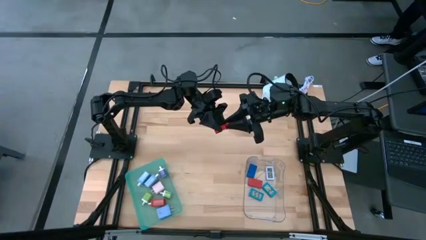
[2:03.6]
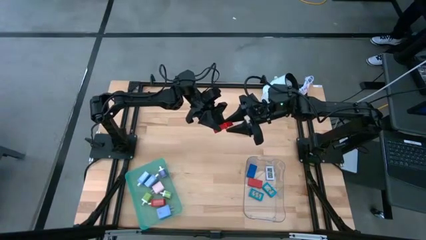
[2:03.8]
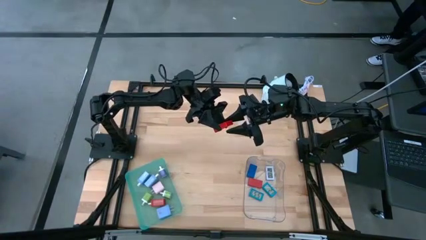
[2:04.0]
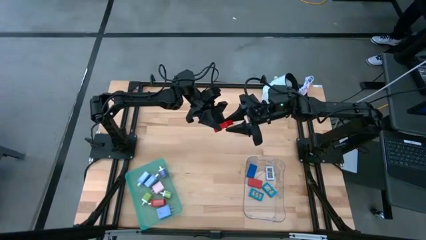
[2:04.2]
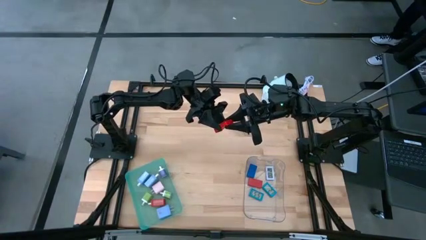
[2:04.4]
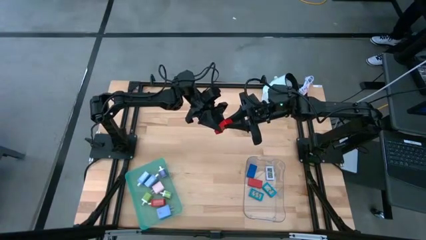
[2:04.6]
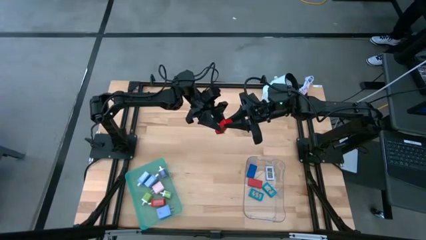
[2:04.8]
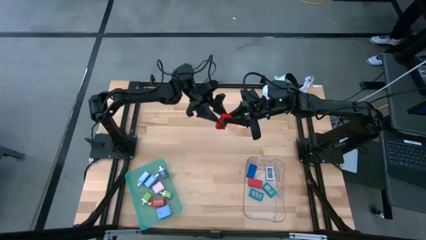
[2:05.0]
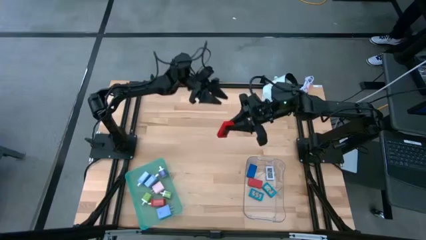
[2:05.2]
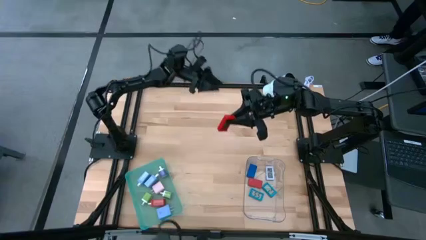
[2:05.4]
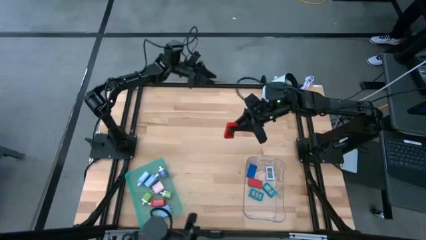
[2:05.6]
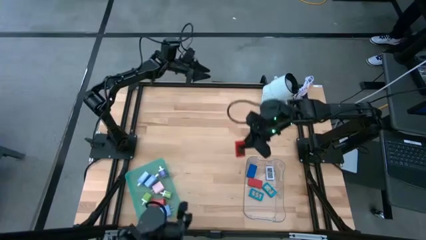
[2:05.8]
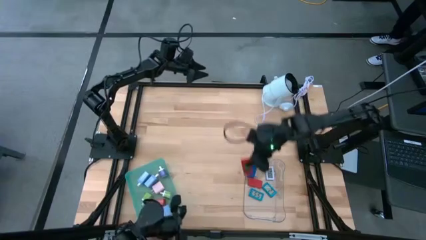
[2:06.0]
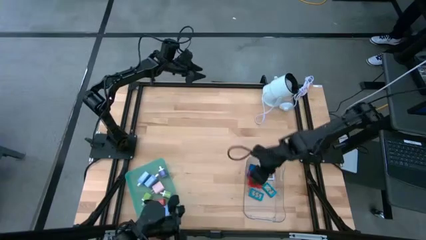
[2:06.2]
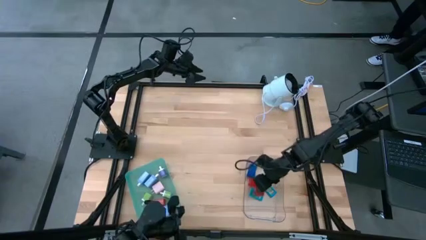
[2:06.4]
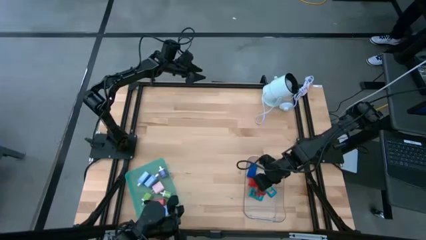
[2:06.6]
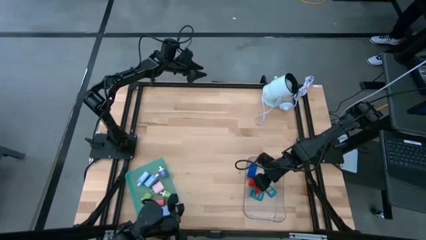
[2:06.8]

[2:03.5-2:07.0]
Task: Pick & Place Office items
Put the red digital clock into the transparent bin

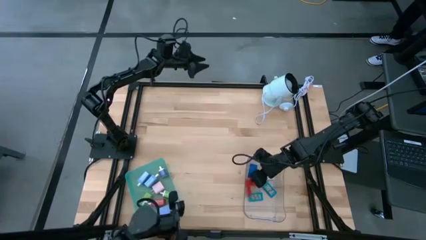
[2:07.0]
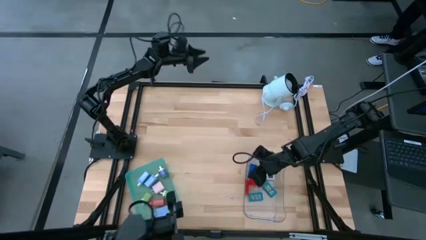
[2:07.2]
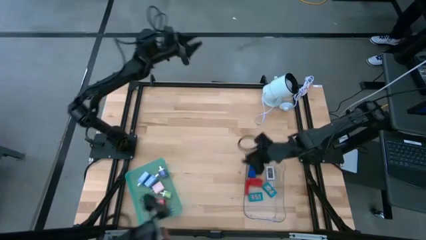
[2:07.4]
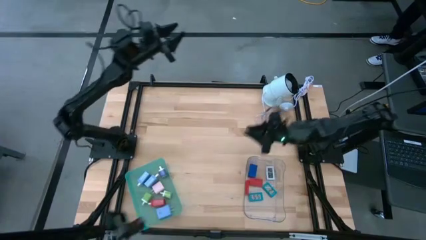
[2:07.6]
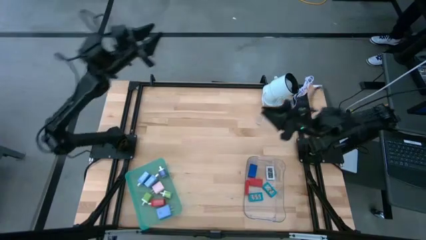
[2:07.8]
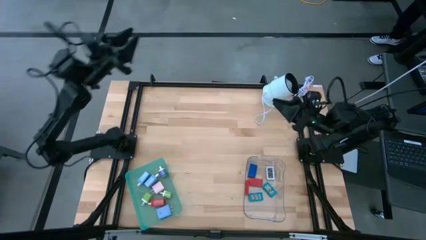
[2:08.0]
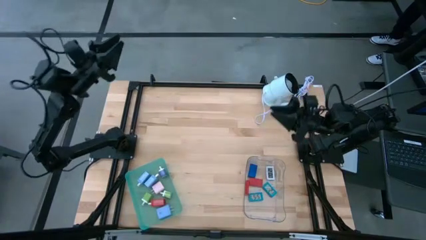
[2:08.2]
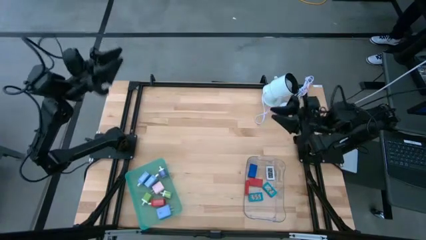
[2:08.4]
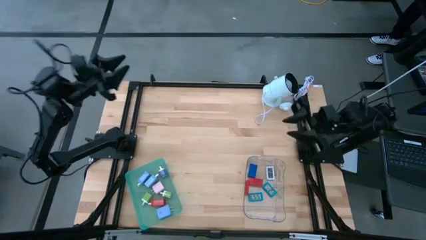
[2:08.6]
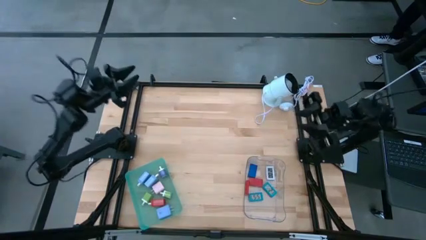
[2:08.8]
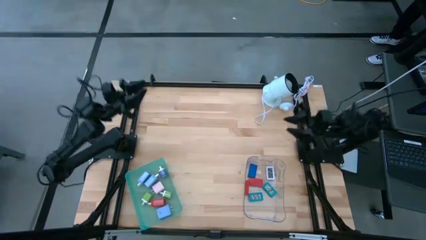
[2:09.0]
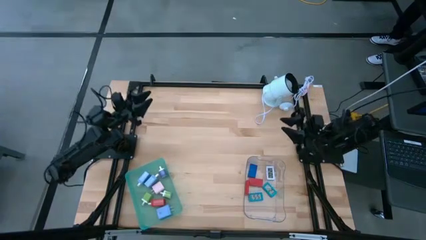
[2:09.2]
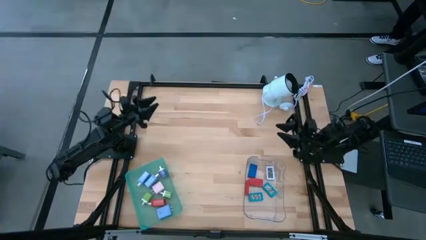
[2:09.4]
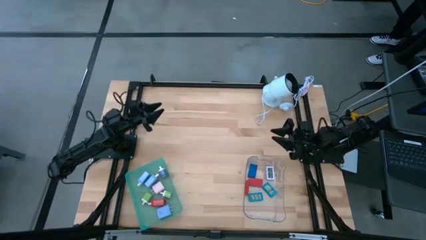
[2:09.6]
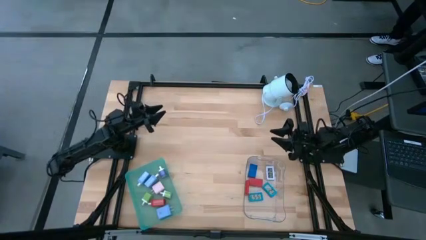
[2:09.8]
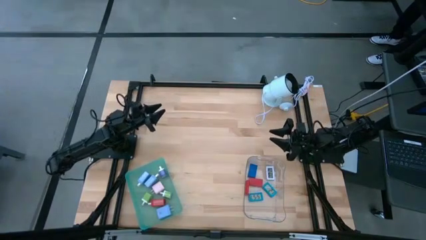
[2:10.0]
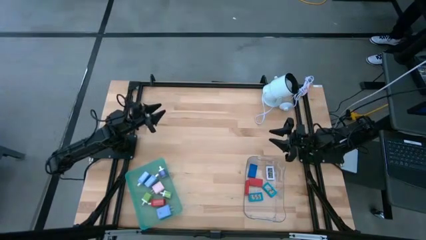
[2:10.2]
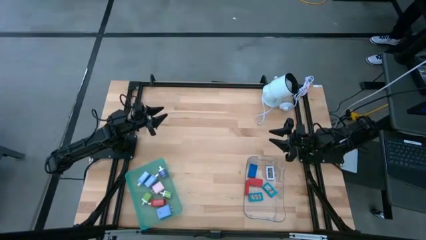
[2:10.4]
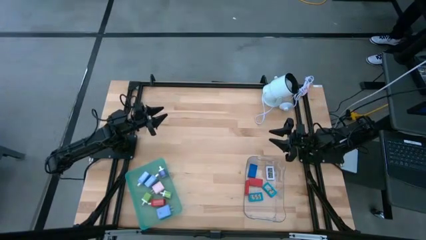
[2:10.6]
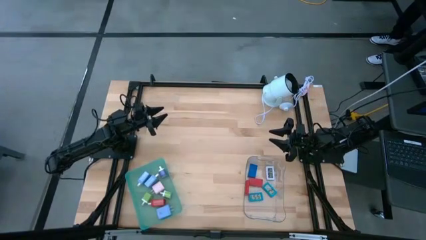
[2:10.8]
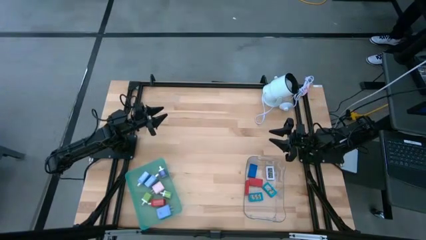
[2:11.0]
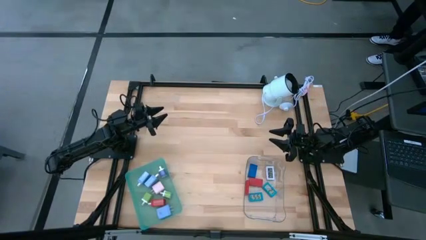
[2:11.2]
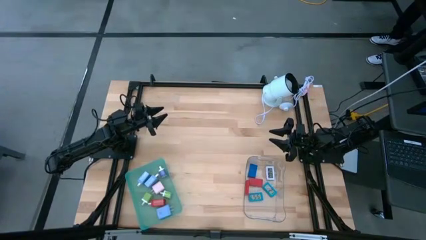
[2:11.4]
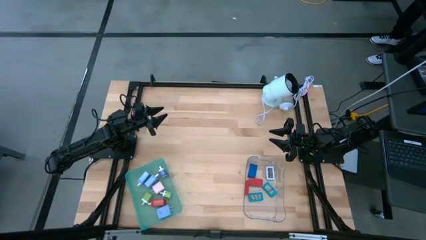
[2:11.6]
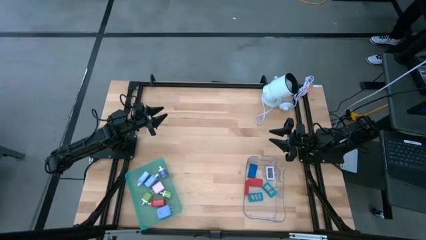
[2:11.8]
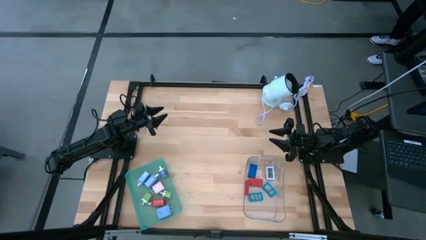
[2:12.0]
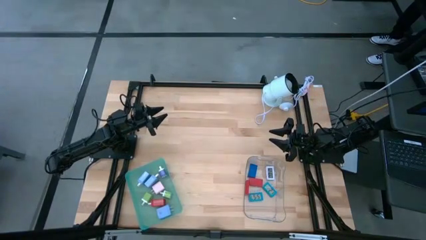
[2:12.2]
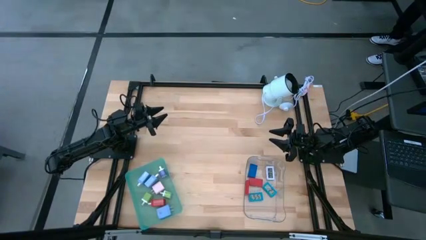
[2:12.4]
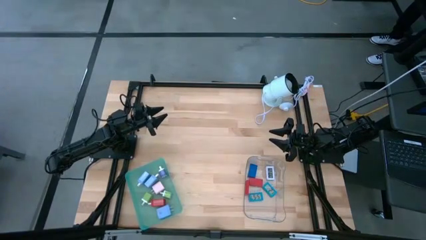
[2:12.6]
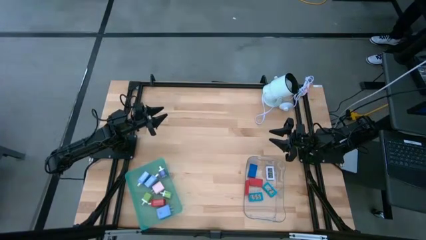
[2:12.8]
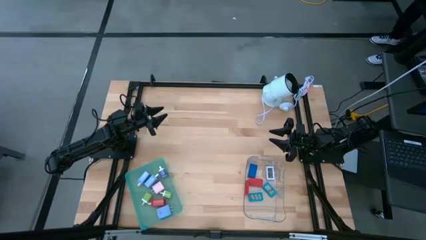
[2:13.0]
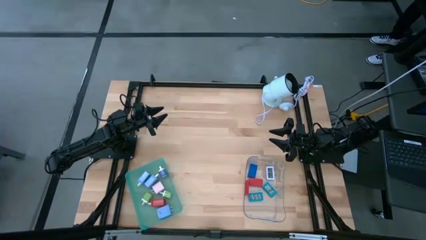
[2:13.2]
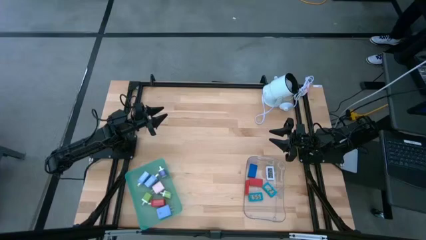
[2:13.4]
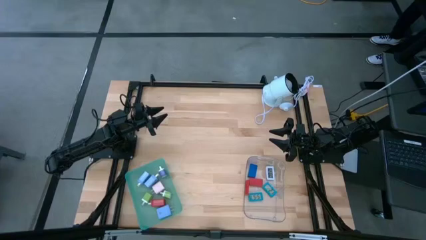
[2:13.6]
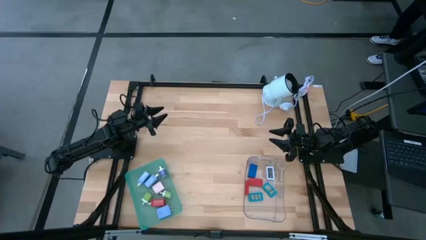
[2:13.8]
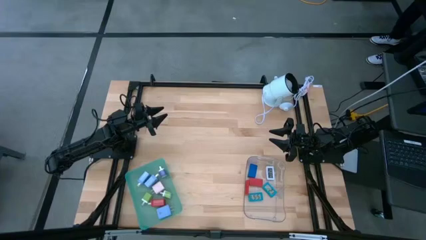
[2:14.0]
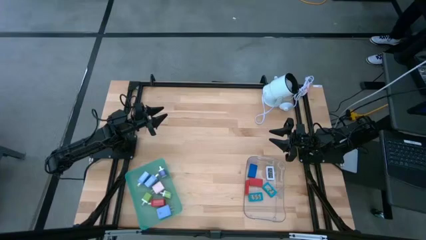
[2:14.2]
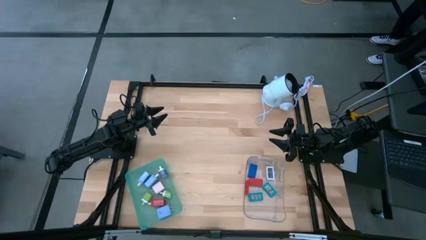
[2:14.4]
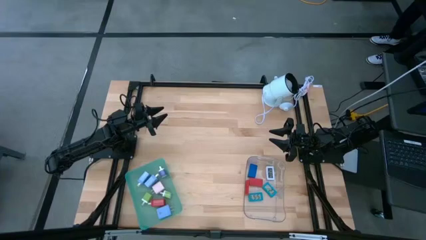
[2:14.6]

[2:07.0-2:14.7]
Return to Home Position

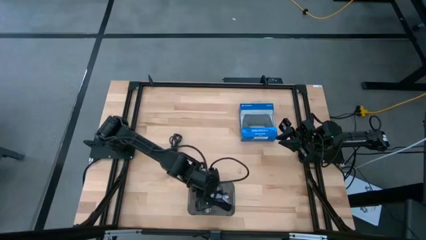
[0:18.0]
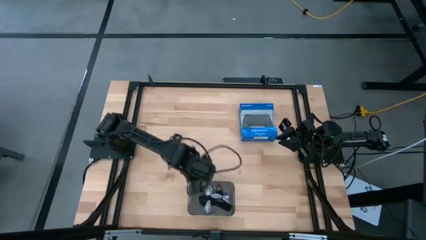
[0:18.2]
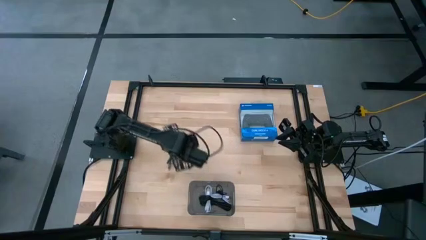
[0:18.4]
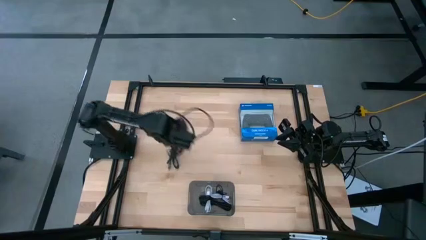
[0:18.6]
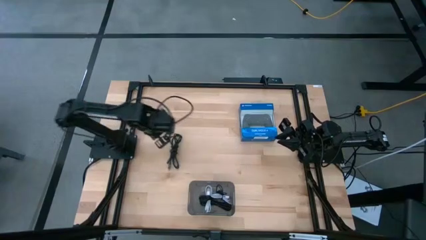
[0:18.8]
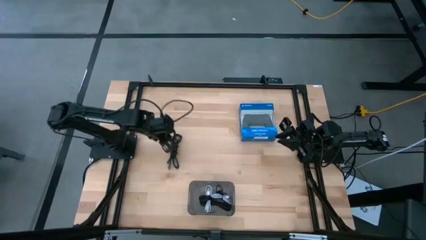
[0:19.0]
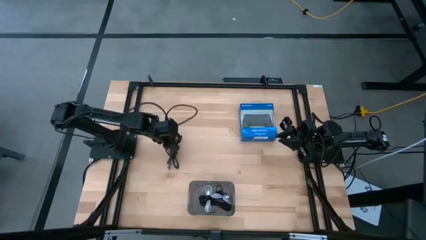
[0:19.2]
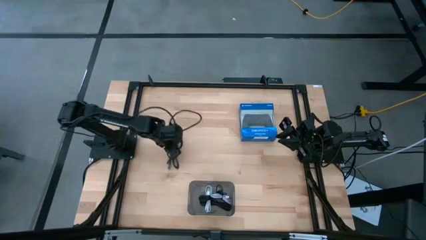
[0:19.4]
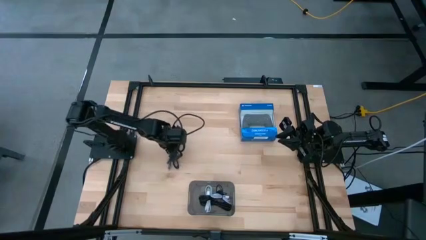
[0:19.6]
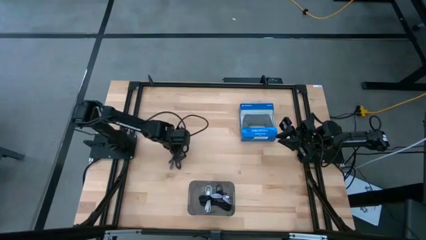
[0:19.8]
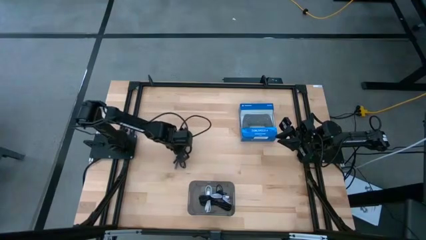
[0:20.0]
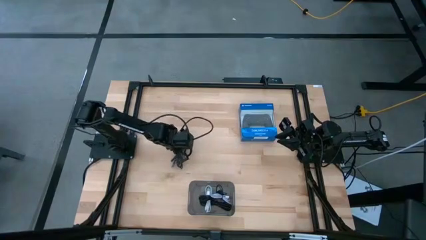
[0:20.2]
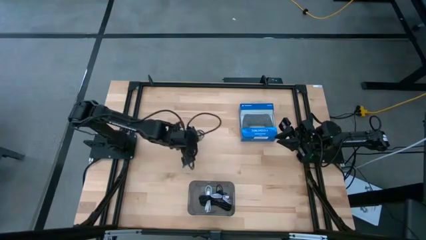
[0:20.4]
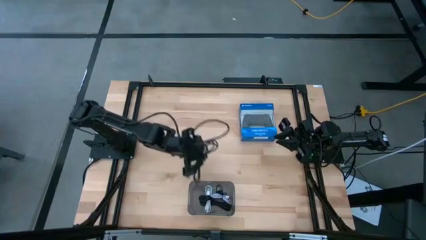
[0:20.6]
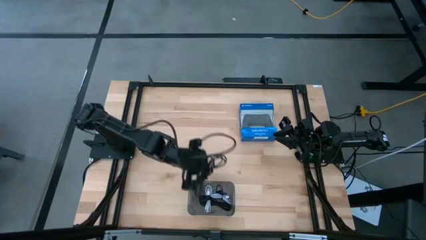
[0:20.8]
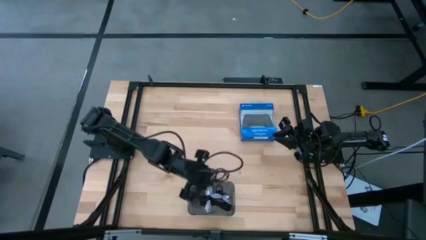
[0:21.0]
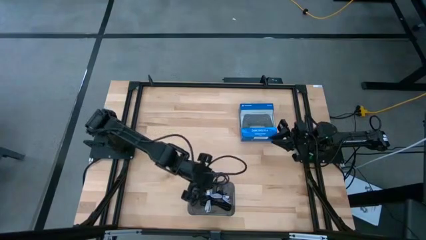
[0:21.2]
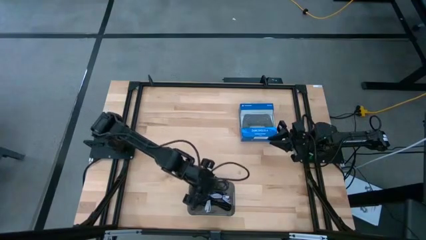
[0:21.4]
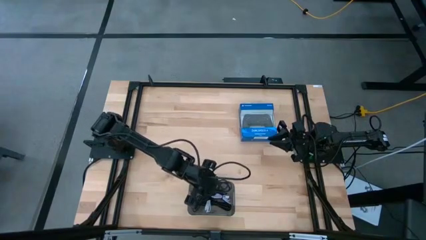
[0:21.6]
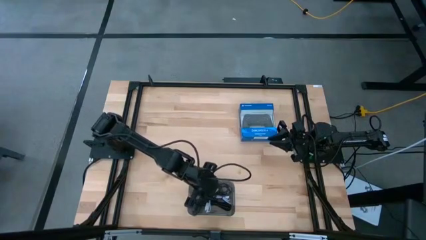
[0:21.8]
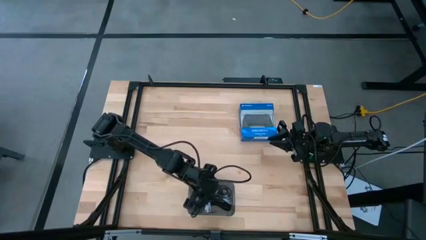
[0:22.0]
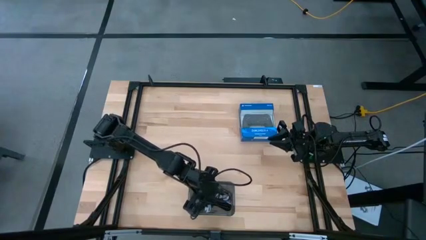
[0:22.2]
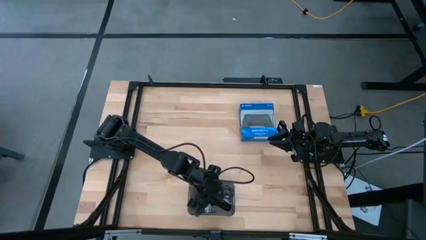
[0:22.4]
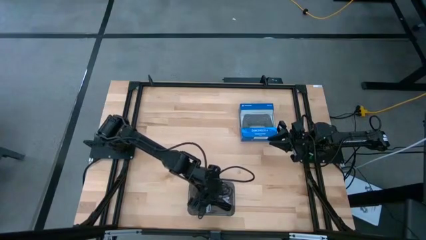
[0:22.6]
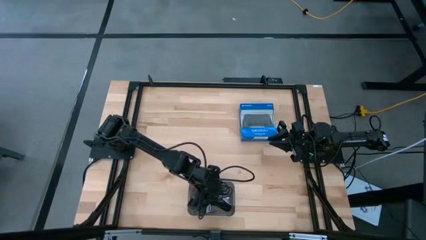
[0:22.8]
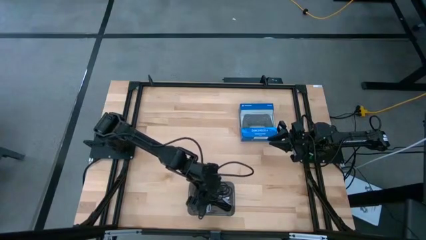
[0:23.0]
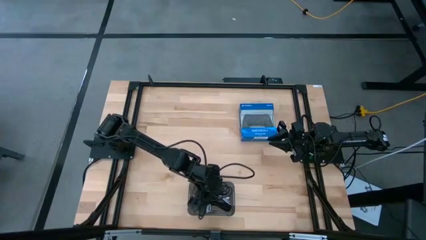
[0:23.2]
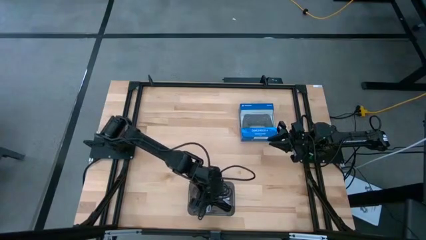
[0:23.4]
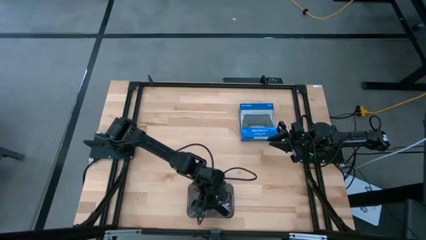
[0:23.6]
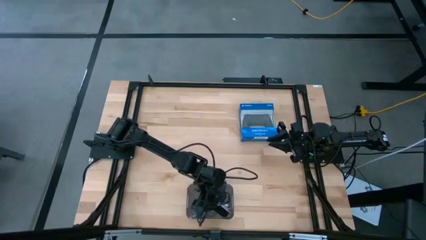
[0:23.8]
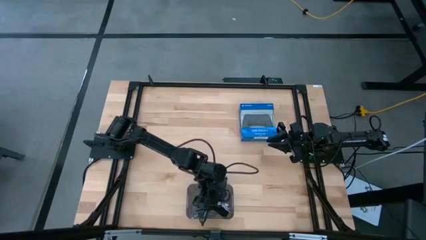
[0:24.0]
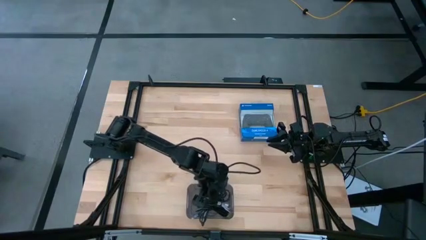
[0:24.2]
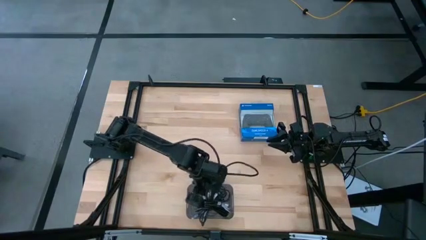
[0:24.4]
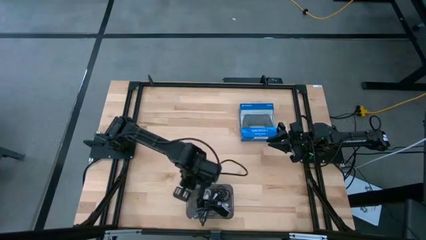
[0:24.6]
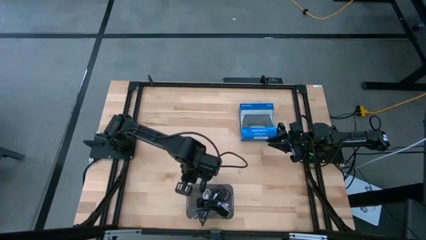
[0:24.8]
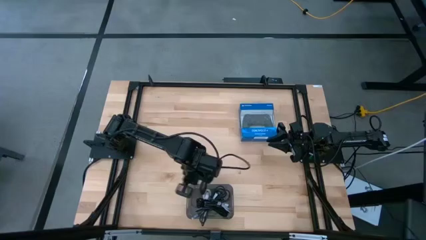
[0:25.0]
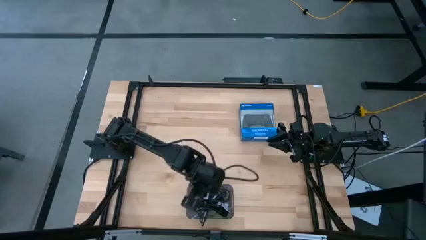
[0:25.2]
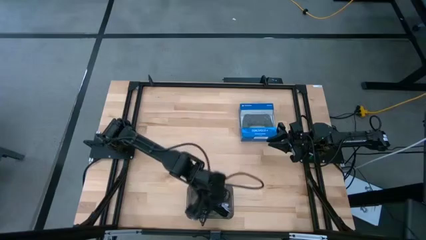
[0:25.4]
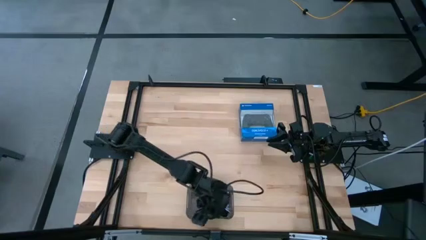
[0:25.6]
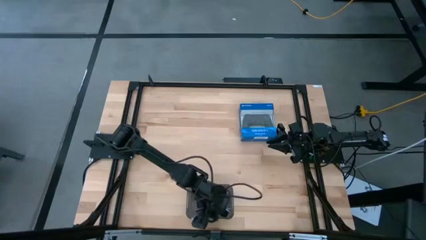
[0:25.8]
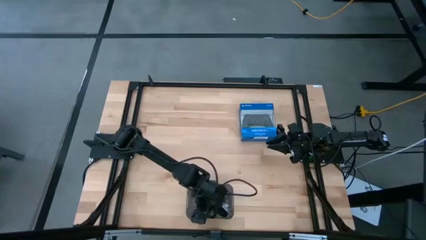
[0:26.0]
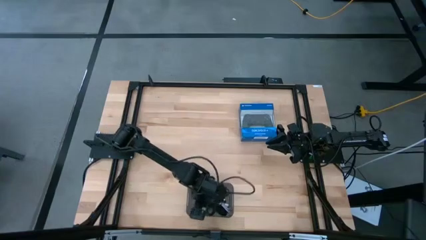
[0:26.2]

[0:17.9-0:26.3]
Task: Pick and place USB-C Cables
Put the black charger cable into the black bin
